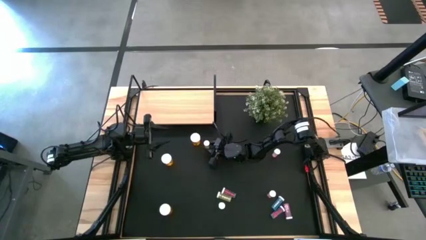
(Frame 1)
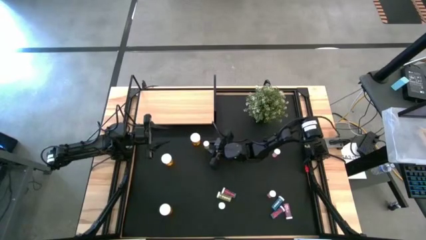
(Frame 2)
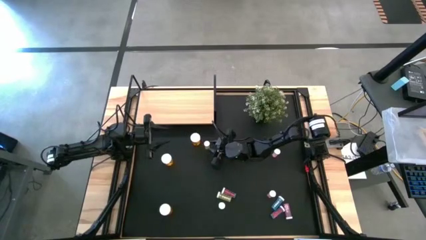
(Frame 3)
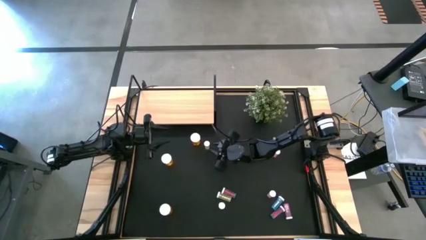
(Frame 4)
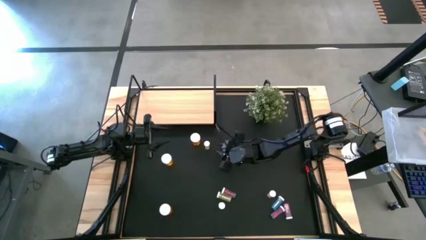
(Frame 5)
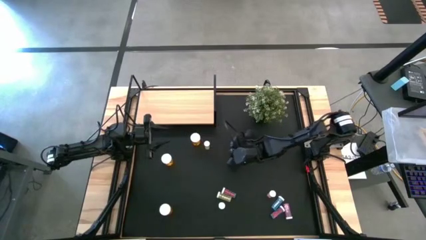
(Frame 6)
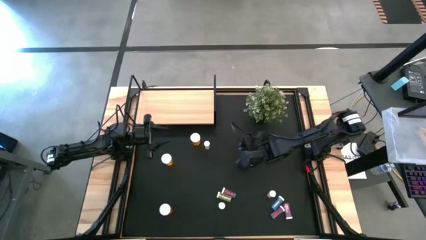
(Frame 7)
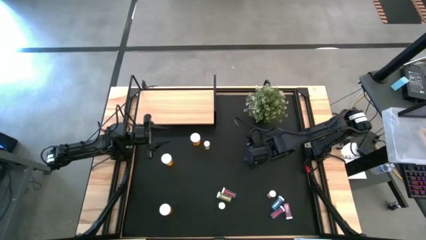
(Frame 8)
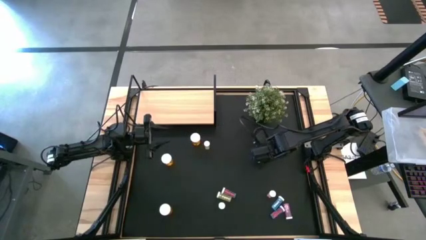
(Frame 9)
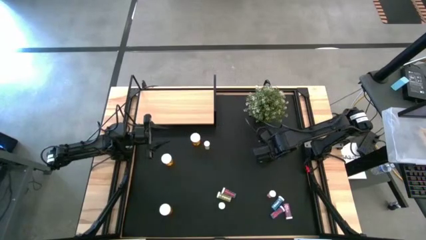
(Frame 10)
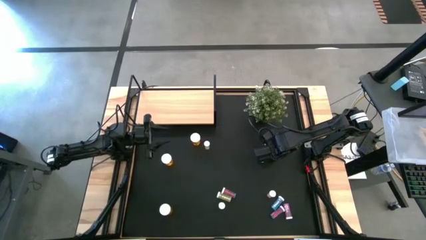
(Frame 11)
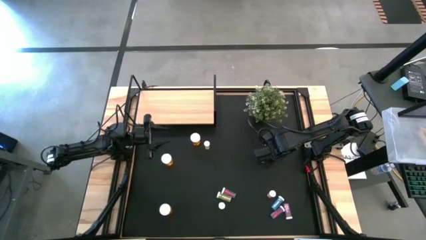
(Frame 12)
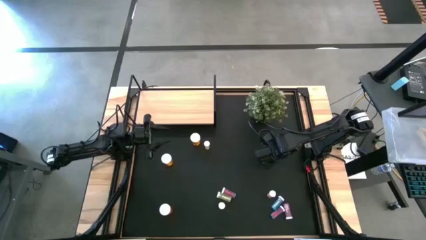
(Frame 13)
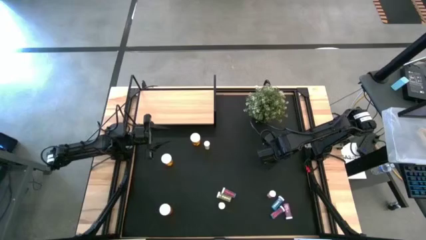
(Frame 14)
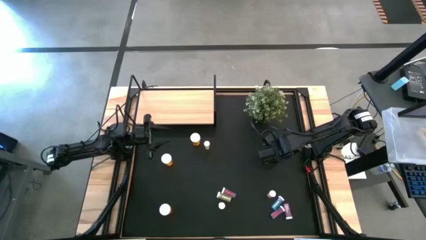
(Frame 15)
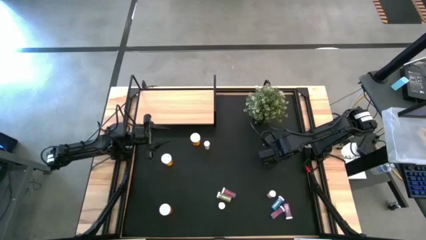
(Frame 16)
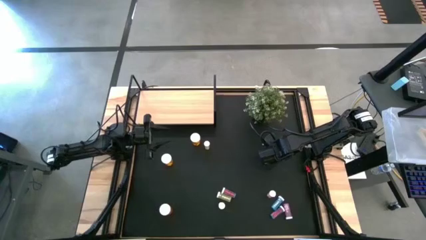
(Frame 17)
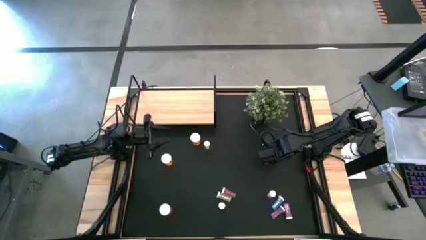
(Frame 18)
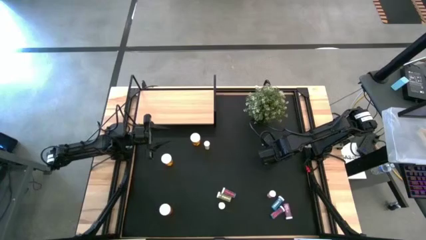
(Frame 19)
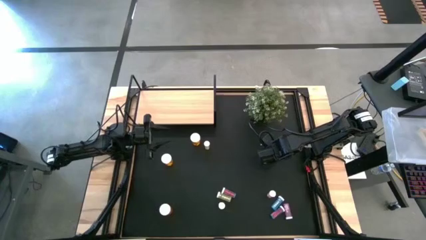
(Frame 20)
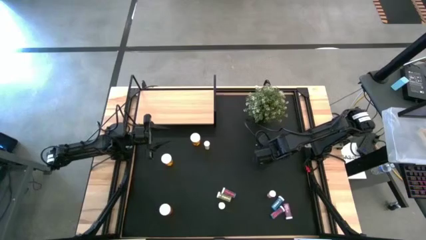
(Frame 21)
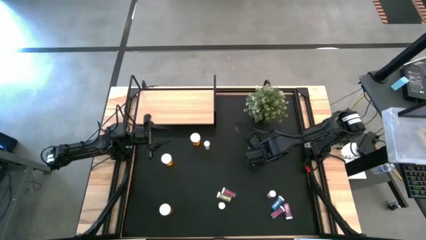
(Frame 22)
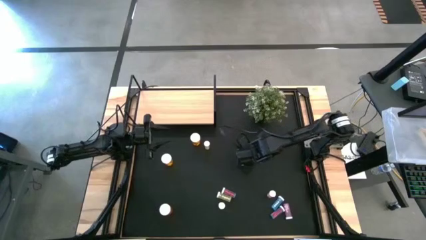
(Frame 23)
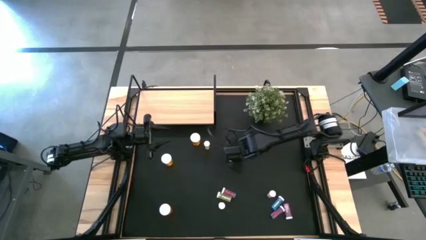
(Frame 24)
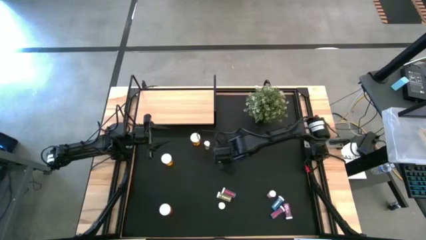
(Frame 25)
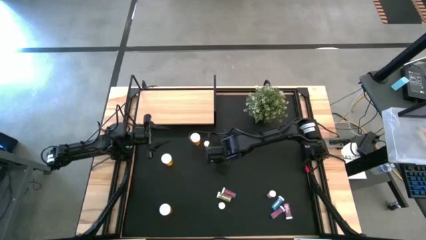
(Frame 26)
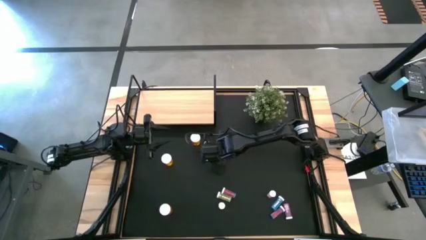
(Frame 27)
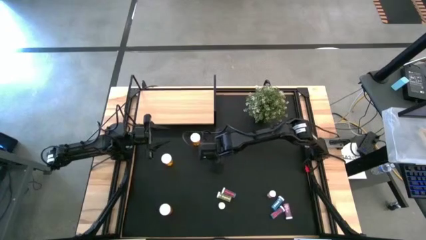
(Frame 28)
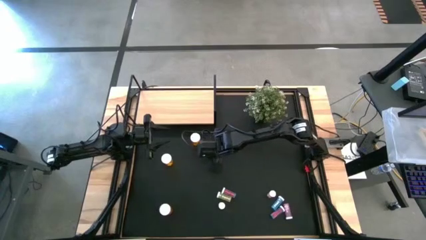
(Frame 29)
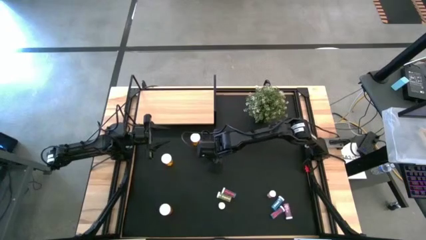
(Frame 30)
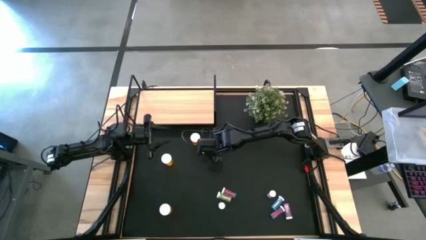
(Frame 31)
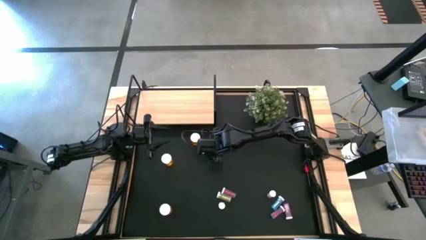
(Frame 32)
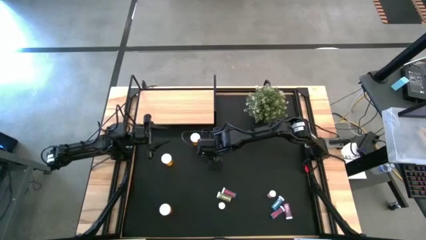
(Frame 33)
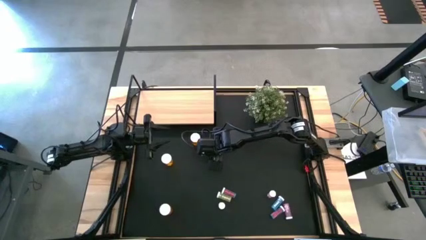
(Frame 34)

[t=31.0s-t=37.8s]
Task: Pick and place medicine bottles onto shelf by color
Move the pink medicine bottle to the center

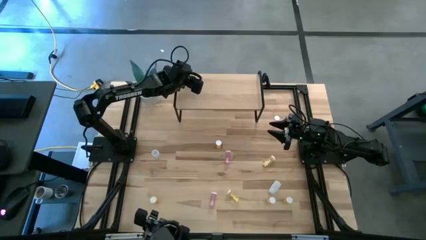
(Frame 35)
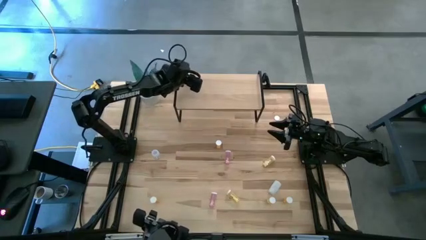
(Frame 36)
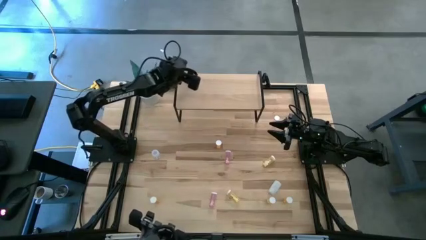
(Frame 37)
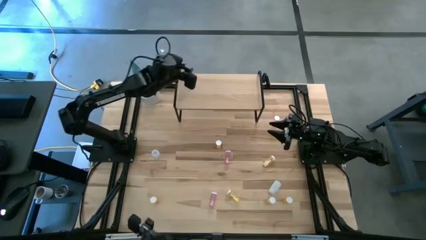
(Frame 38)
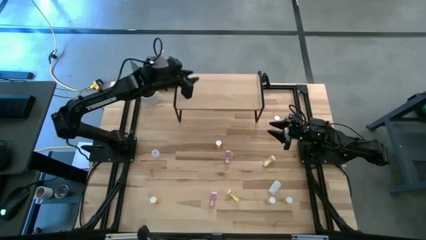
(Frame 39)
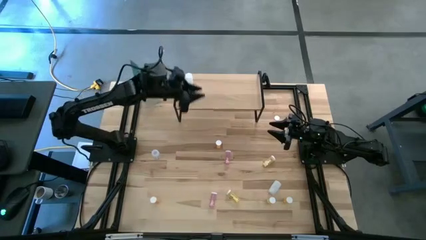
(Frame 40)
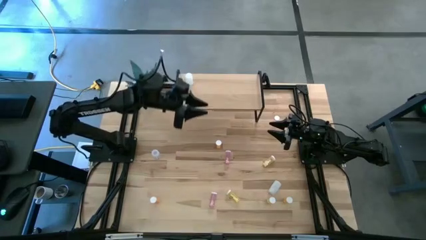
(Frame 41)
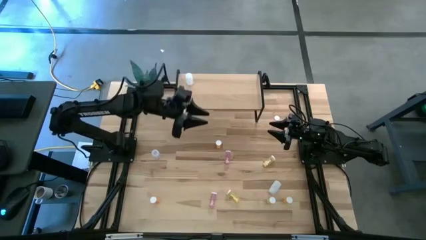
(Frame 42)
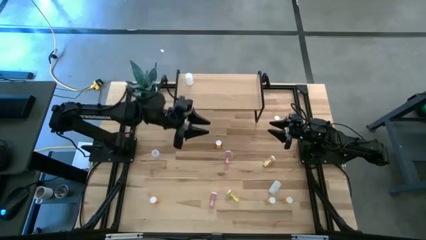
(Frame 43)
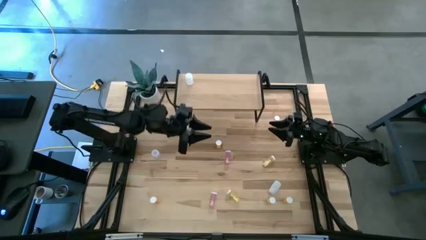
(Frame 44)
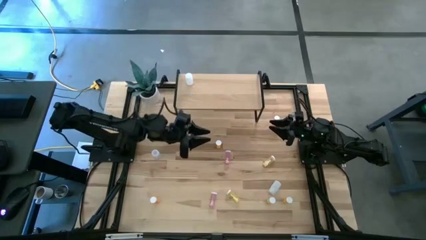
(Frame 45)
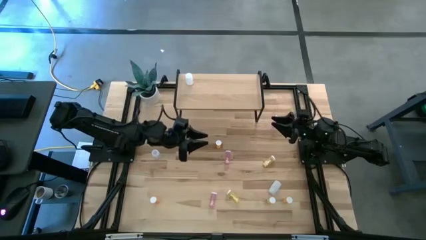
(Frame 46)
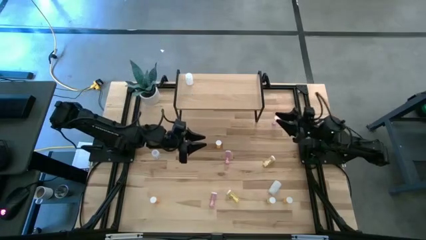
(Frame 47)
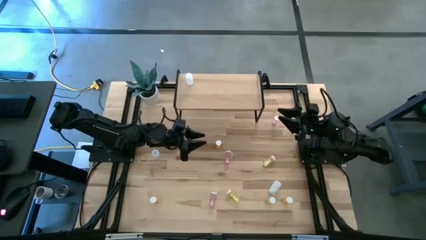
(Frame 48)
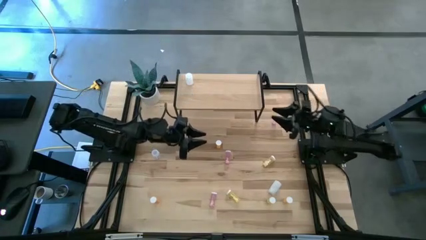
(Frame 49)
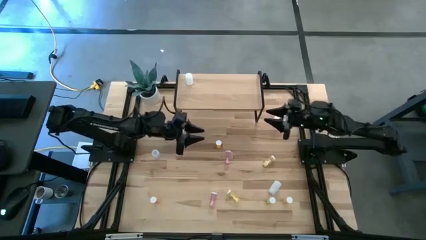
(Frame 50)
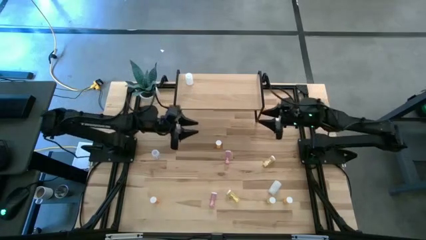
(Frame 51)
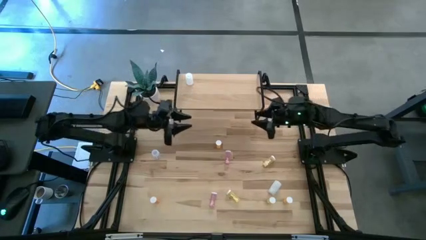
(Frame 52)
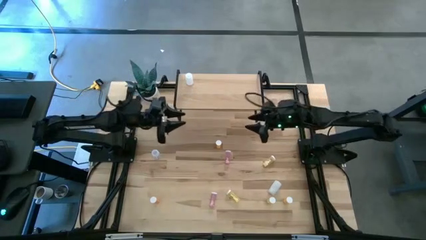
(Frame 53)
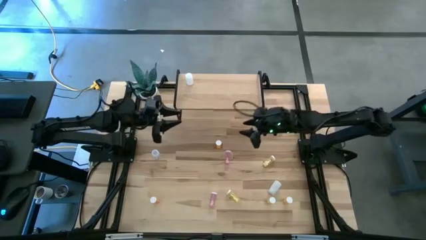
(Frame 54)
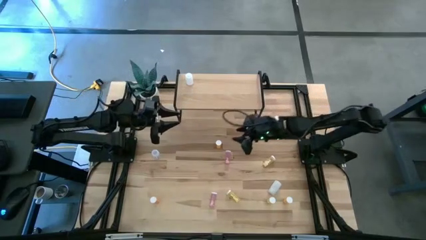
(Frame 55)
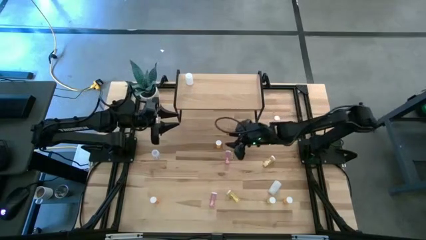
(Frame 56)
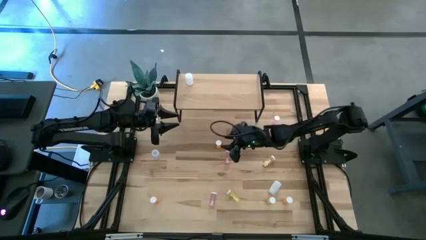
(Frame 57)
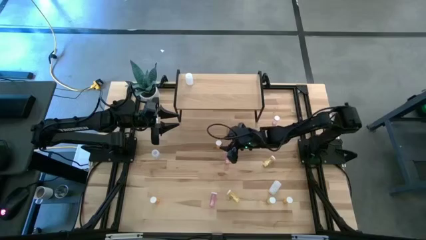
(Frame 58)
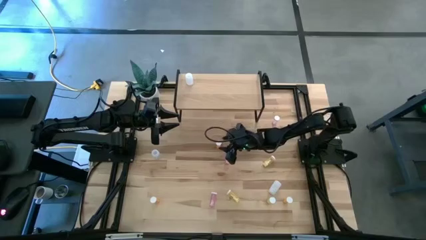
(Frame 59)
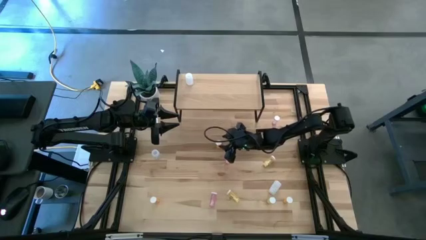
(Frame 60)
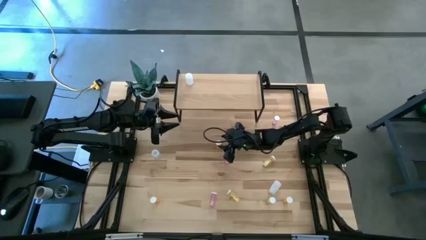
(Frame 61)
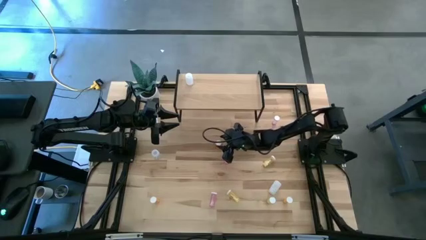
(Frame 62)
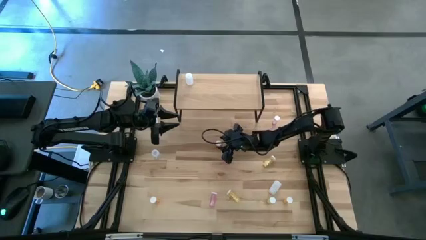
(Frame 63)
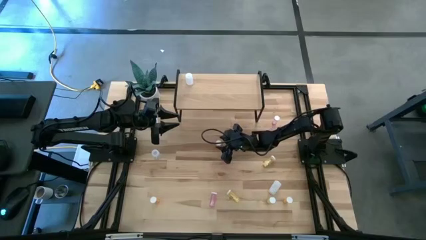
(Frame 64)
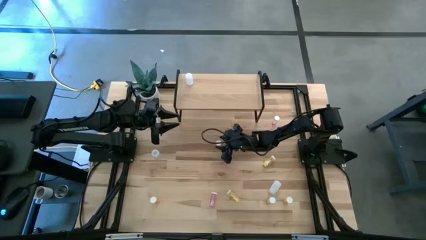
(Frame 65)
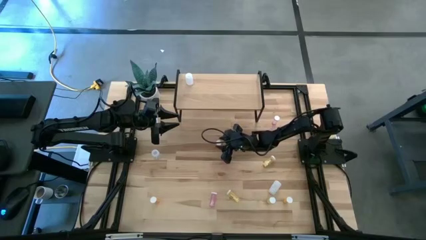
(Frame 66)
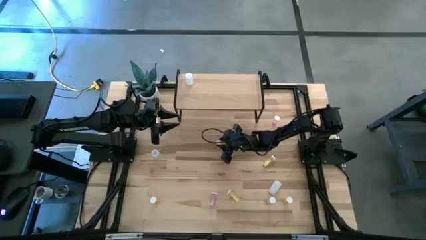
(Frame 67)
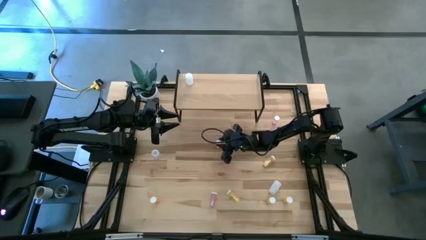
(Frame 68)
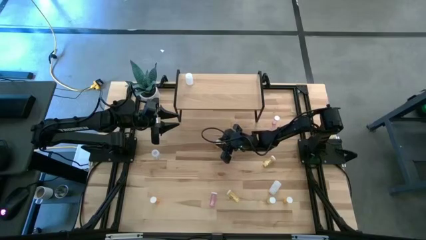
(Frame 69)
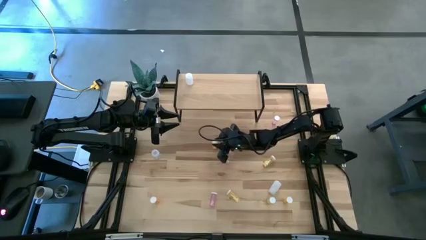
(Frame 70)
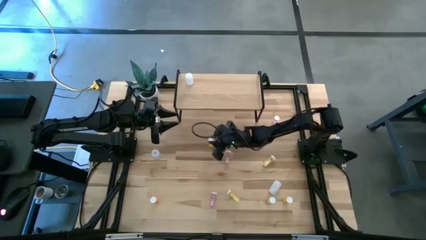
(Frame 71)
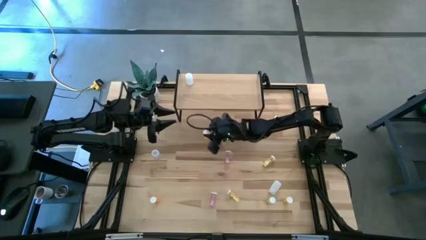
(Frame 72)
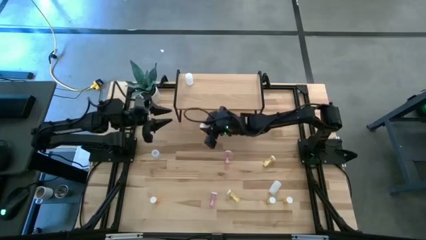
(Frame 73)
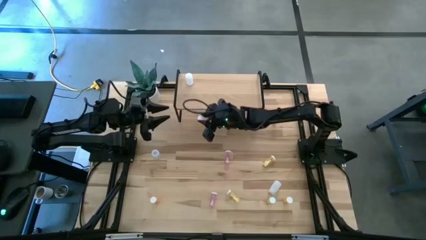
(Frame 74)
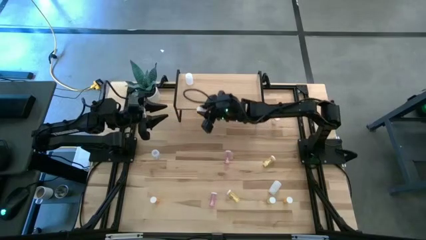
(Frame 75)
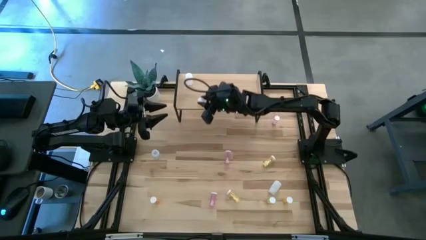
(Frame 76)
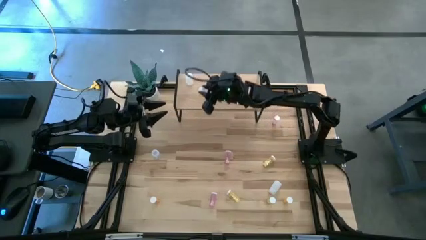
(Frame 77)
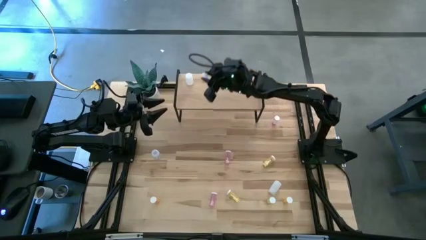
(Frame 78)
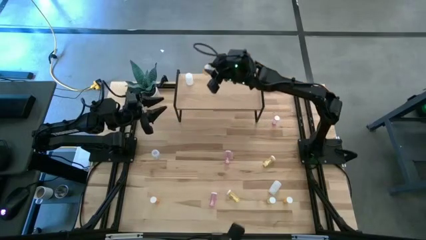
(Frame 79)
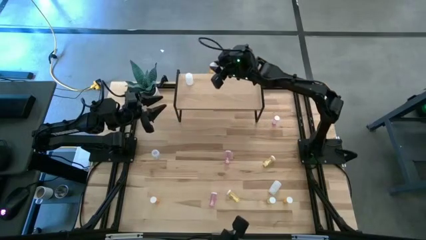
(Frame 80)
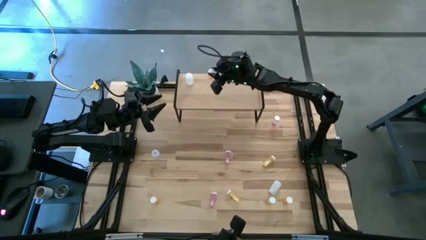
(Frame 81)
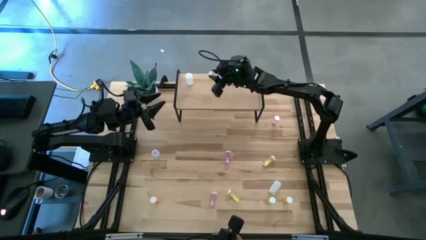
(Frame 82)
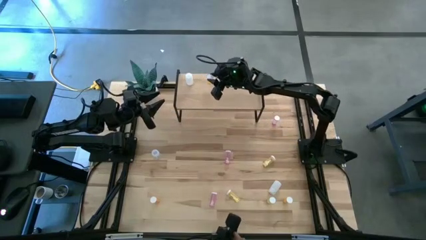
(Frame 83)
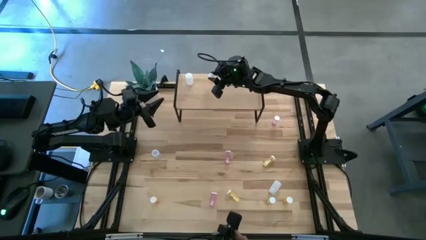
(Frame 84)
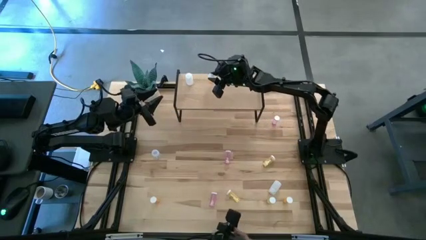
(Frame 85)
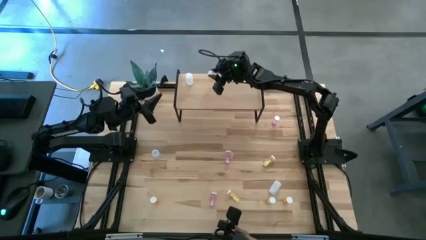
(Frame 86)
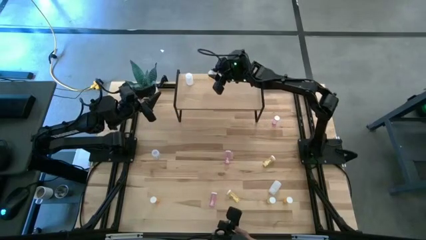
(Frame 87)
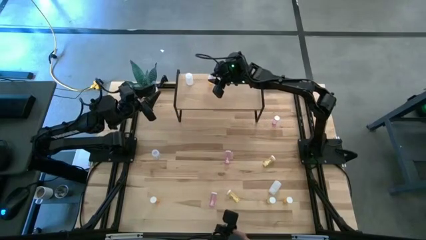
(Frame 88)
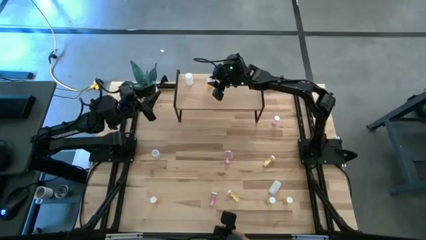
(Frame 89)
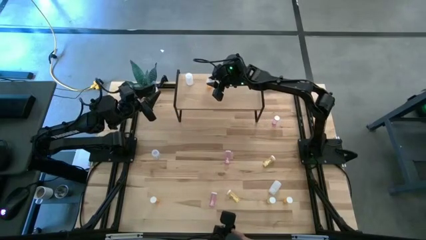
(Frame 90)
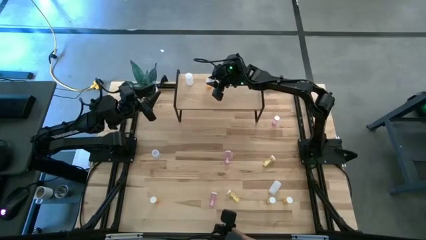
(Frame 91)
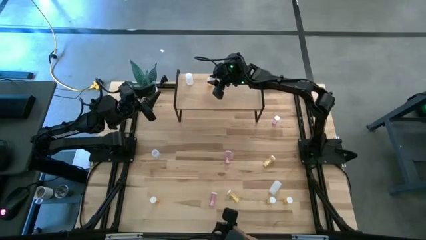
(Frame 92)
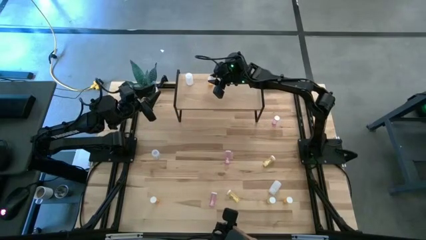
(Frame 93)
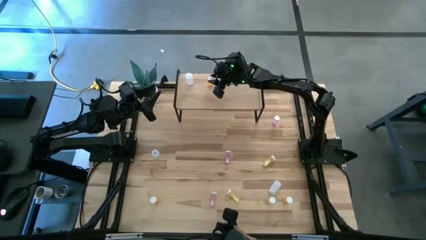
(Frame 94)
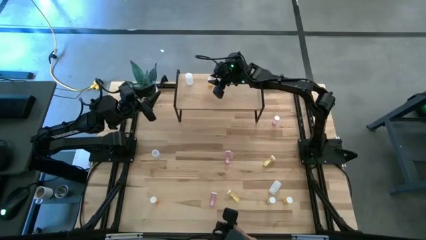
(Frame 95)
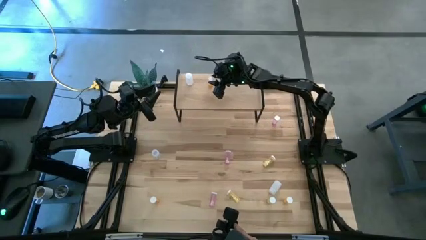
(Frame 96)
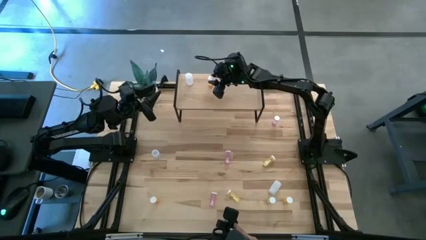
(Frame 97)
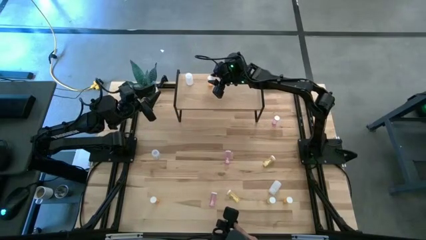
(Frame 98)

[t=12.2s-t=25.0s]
Task: Pick and place medicine bottles onto shelf by color
Put the top center orange pill bottle on the shelf
